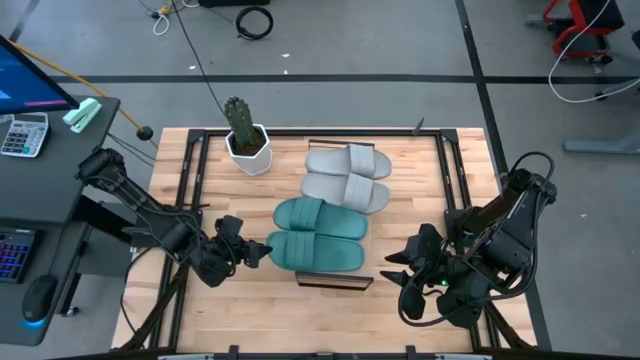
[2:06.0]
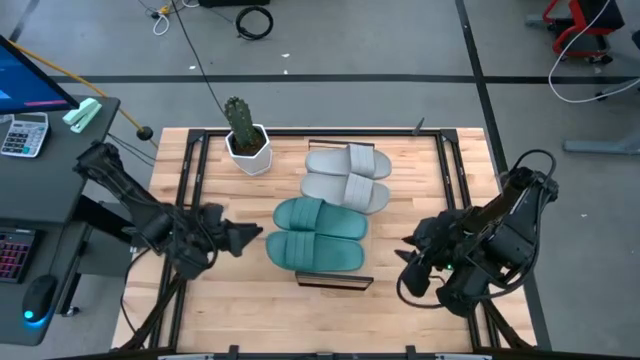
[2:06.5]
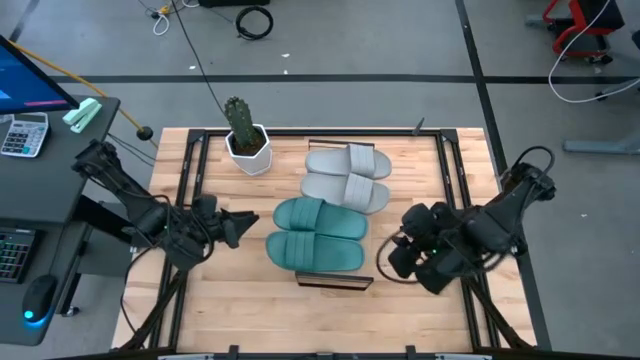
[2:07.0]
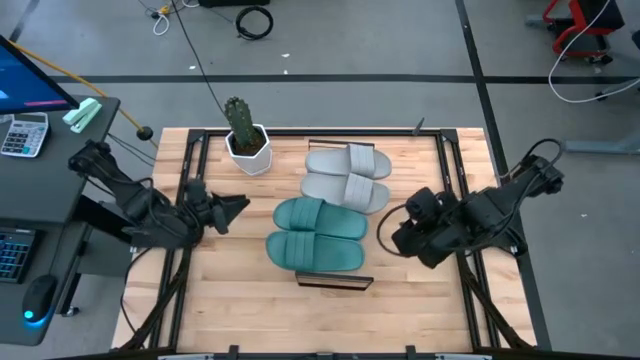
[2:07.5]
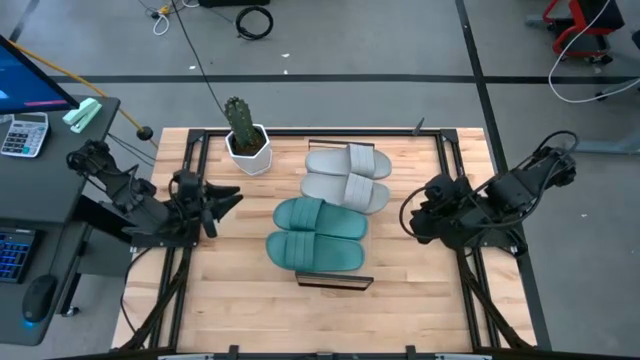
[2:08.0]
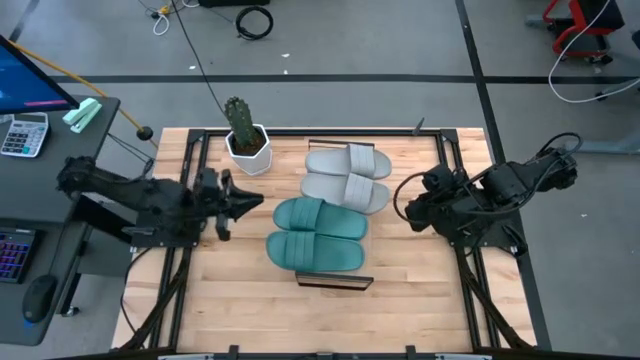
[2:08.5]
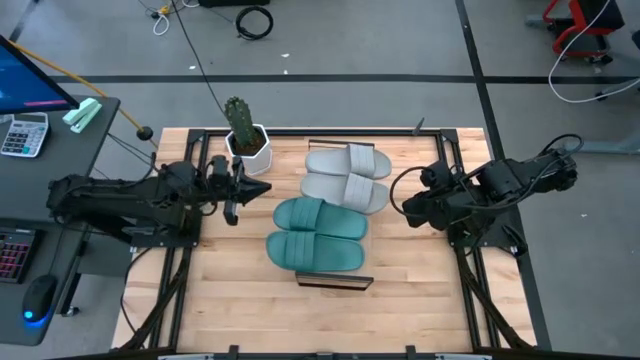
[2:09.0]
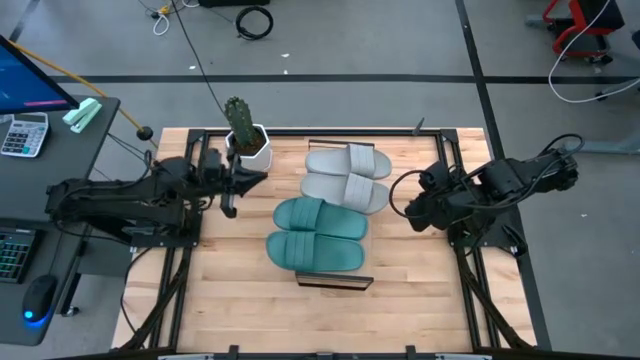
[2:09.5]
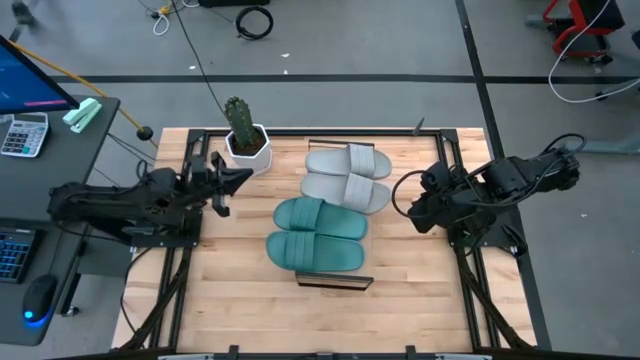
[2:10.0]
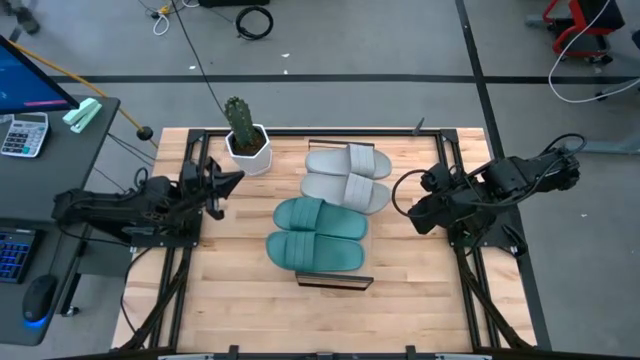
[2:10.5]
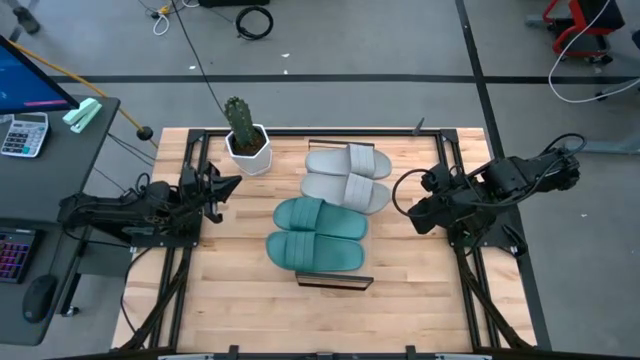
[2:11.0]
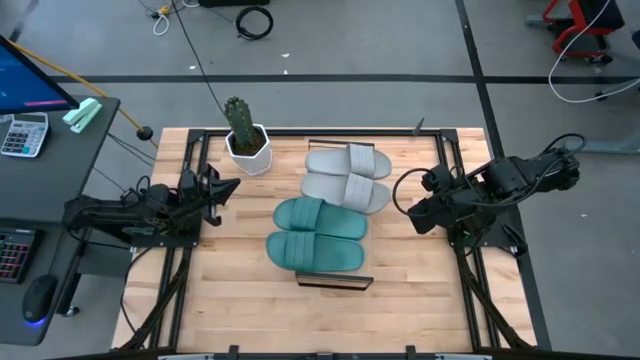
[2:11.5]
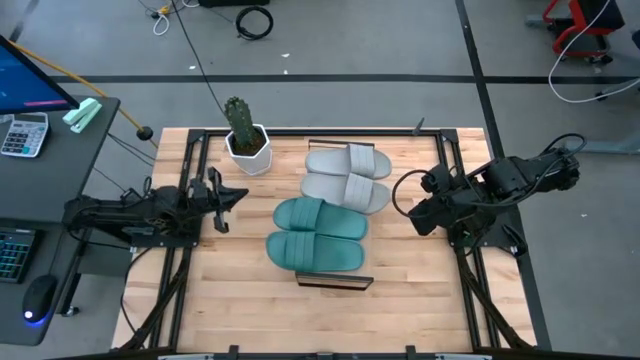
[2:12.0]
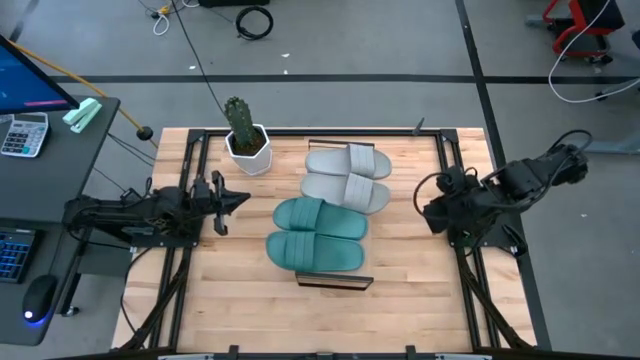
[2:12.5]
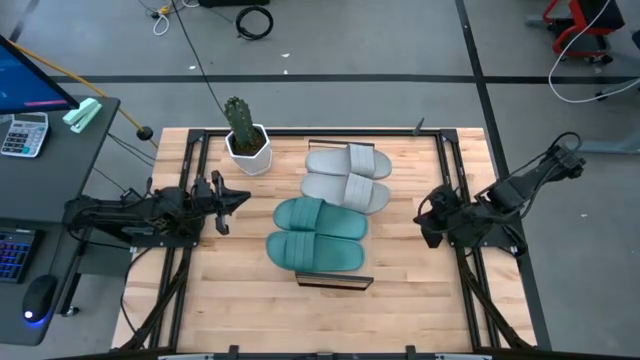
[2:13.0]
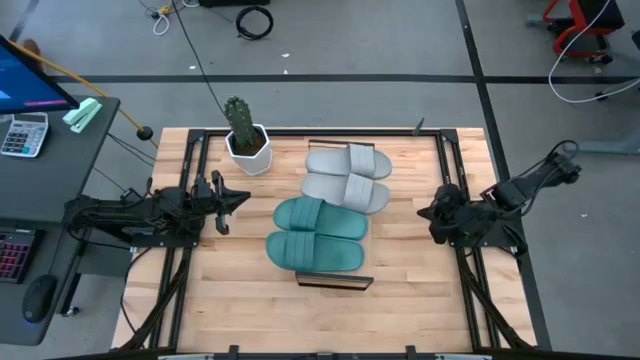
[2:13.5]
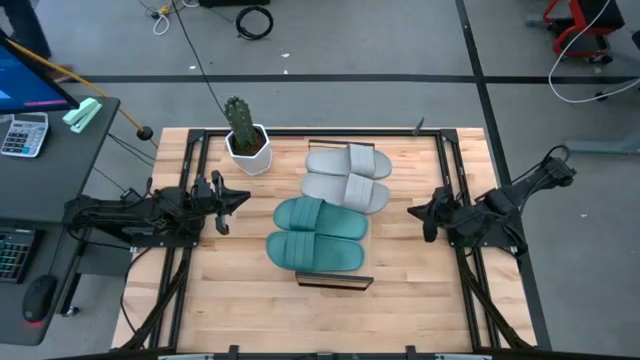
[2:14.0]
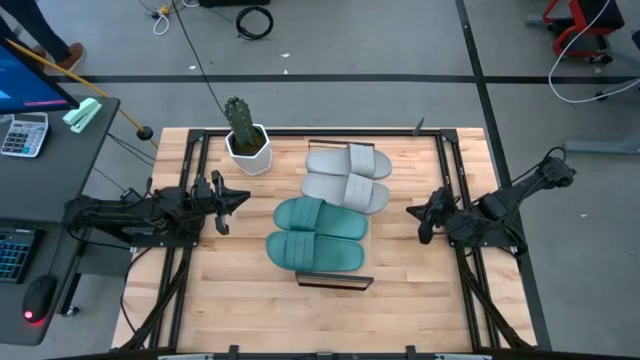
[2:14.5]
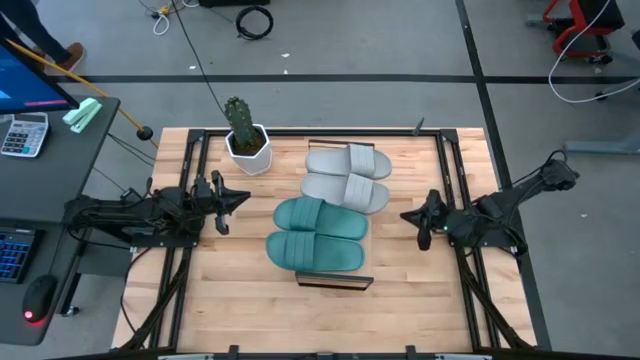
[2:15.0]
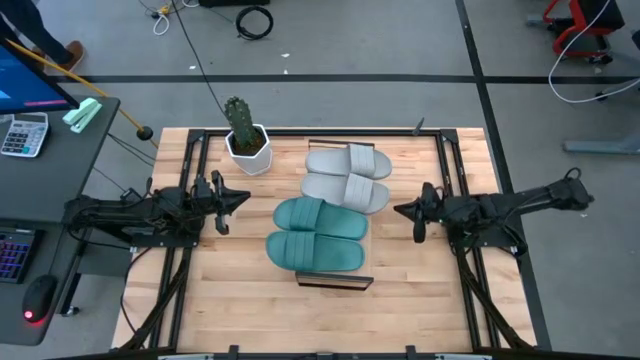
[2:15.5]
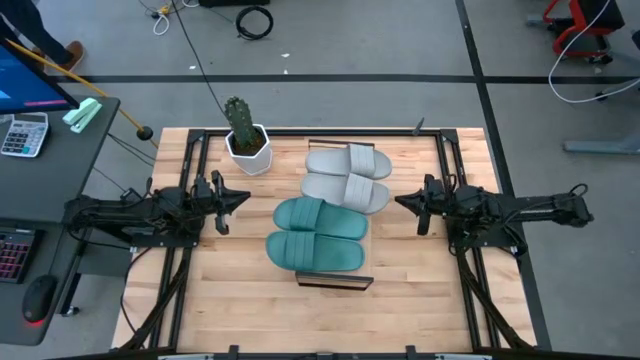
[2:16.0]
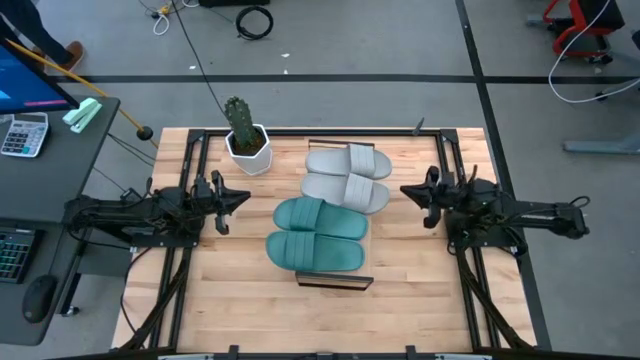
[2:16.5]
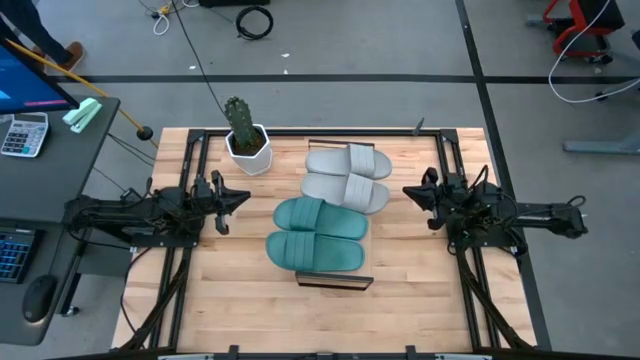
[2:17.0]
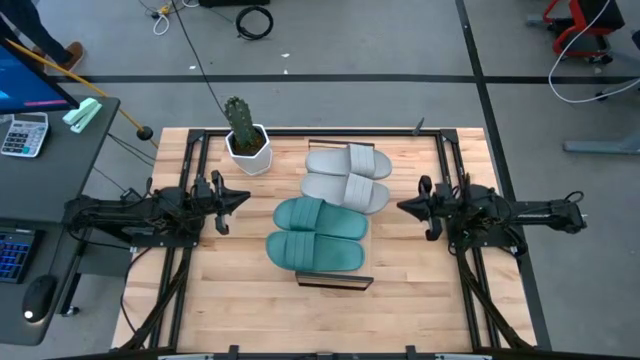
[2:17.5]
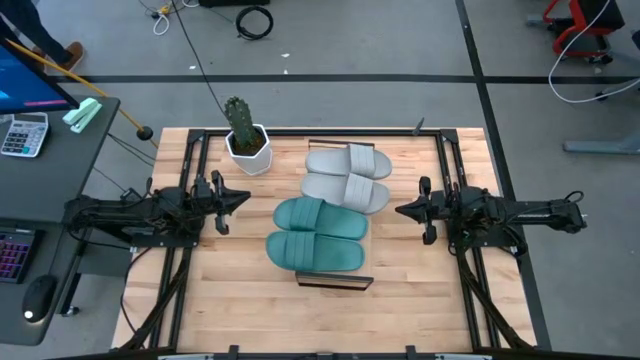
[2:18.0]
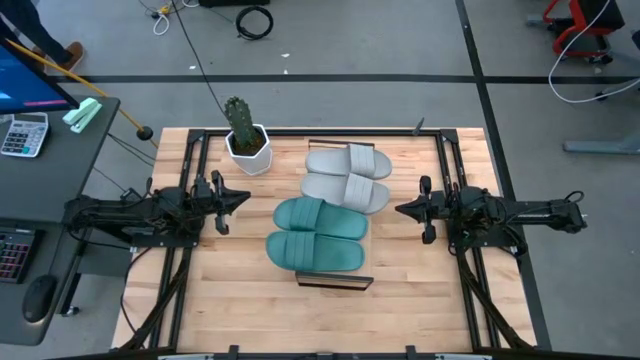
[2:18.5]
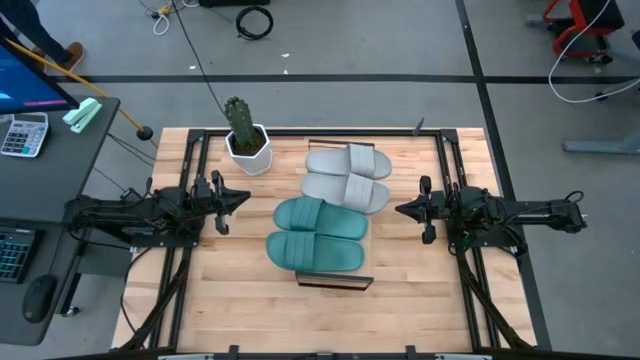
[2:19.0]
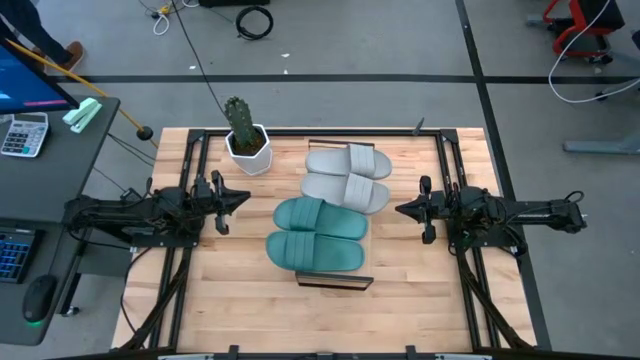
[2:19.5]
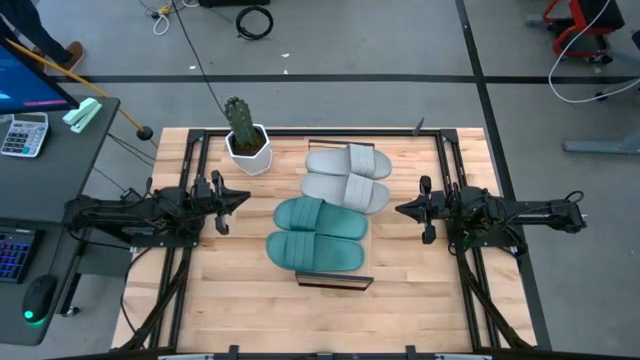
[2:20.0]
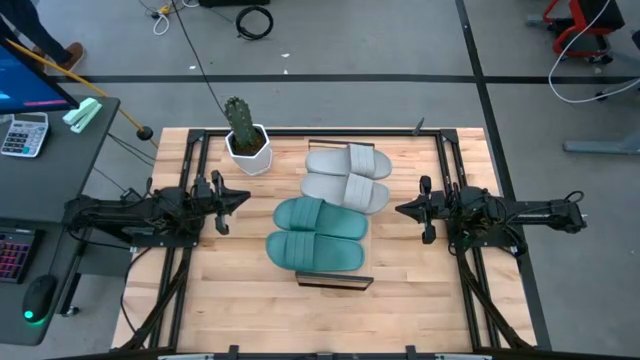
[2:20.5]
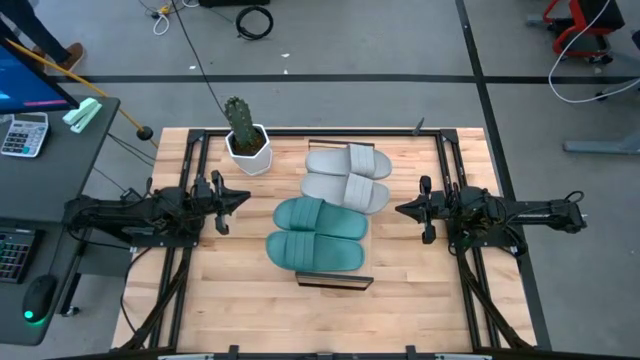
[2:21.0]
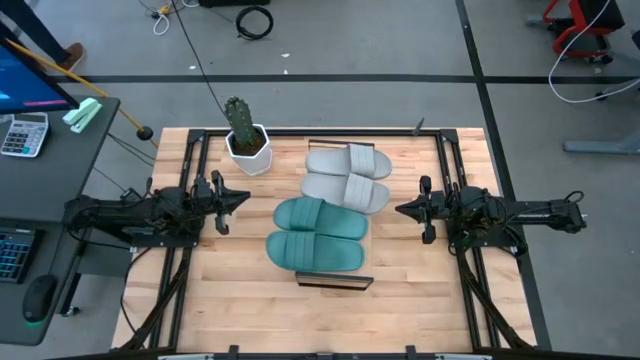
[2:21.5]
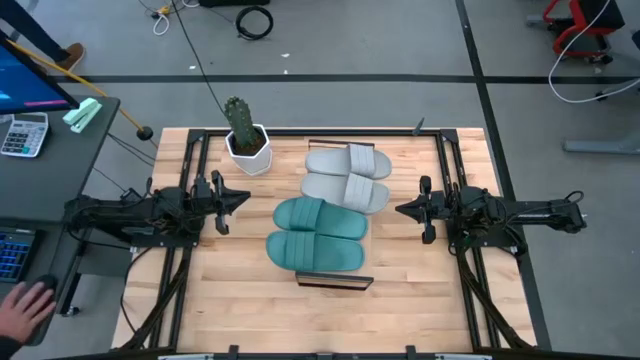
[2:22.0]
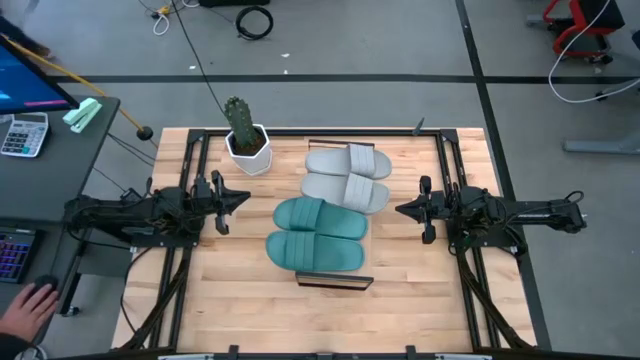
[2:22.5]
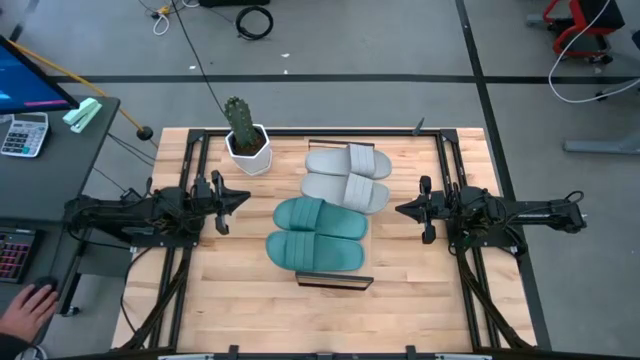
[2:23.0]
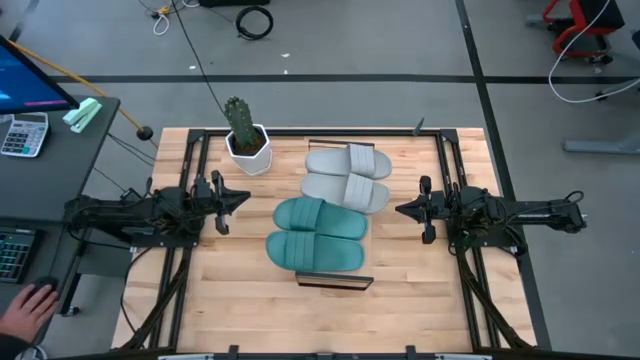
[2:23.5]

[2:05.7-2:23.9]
Task: Pick and place slides into the shelf
Return to Home Position

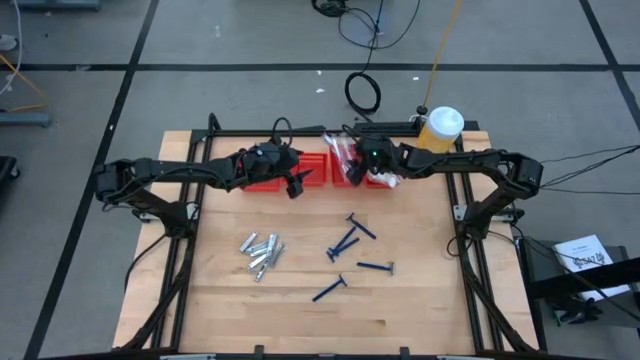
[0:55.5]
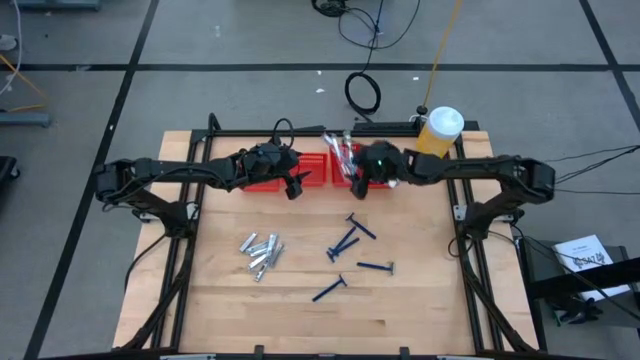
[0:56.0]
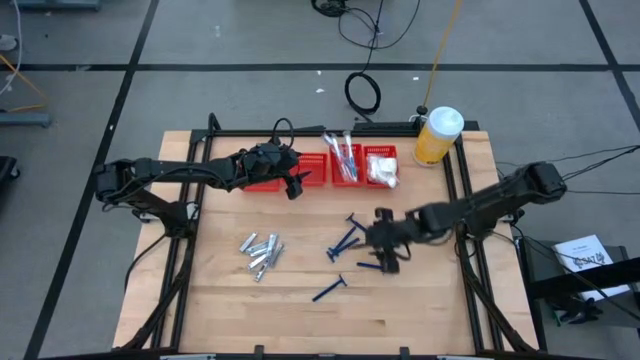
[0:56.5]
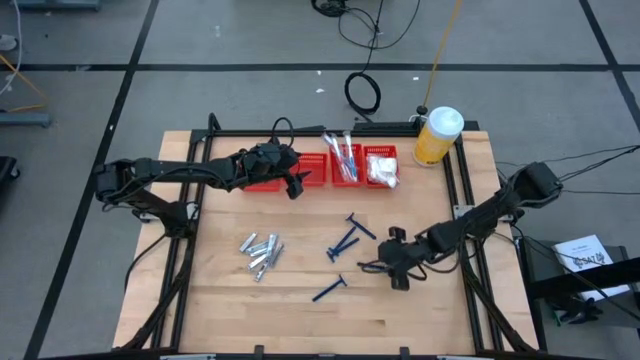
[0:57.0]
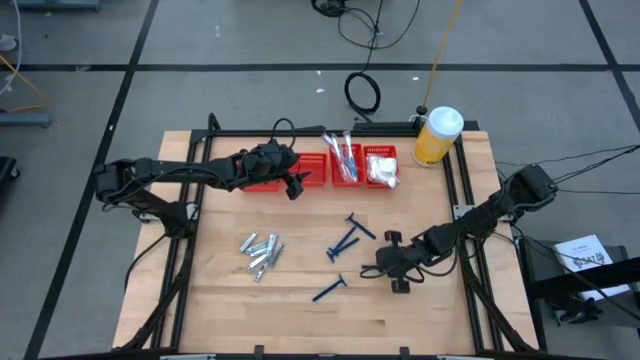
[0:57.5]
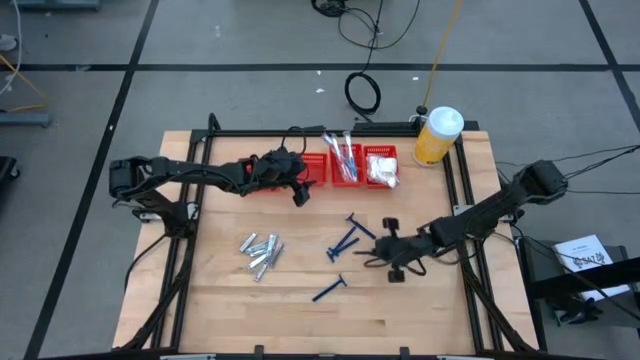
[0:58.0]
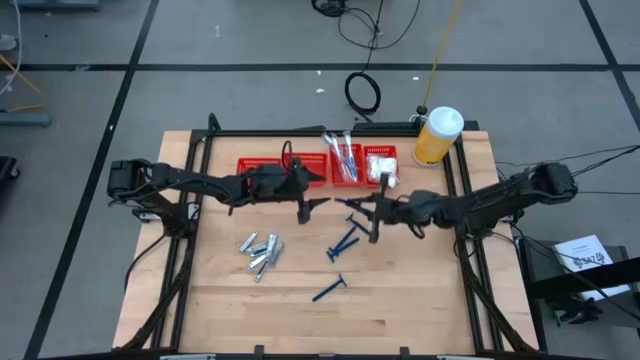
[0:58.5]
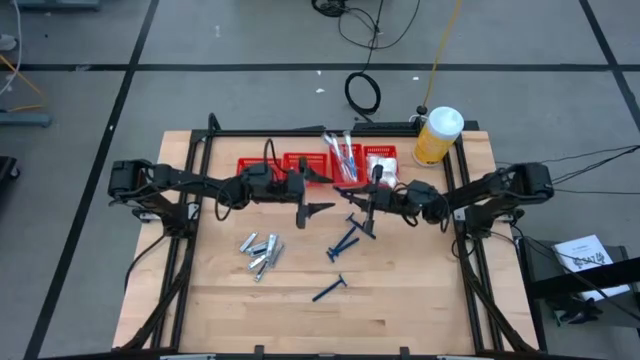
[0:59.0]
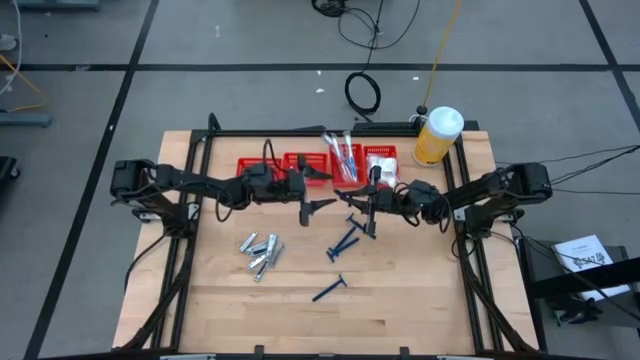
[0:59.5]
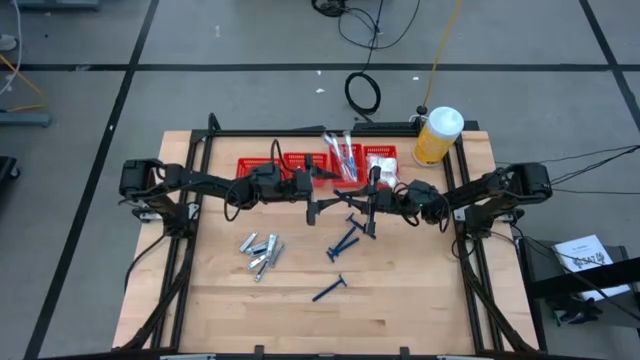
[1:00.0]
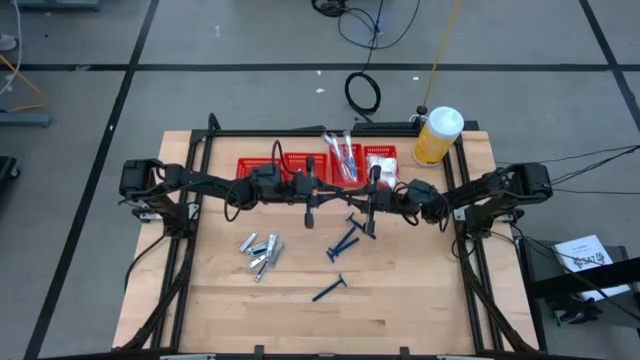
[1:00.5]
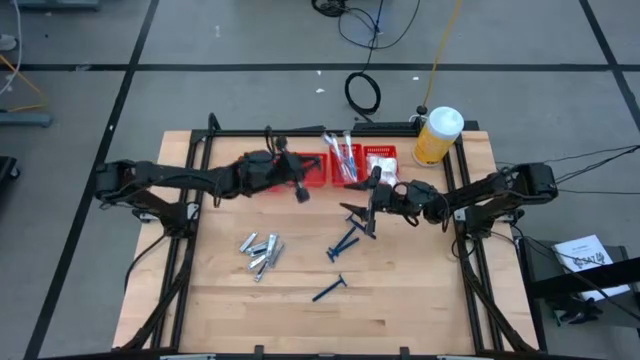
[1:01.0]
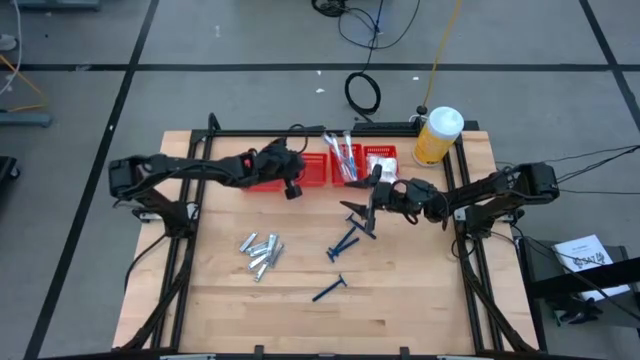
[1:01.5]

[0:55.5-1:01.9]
Task: Pick & Place Travel size toiletries
Put the razor into the horizontal right red bin
